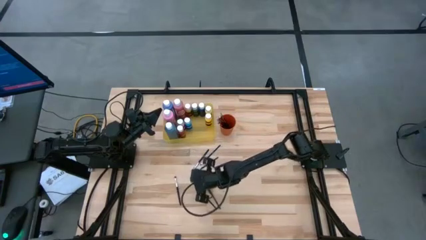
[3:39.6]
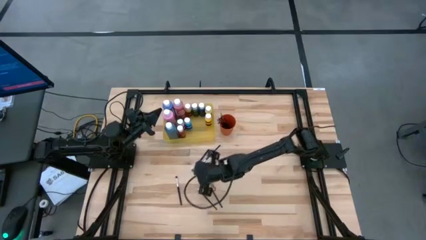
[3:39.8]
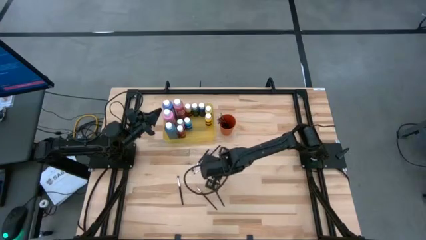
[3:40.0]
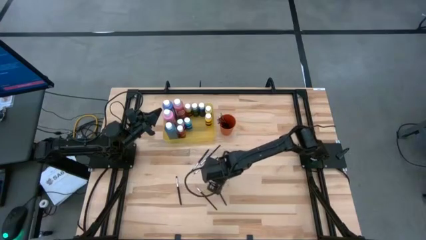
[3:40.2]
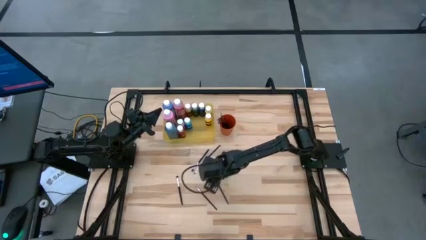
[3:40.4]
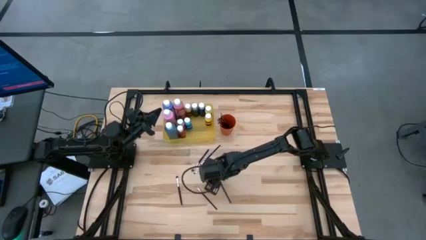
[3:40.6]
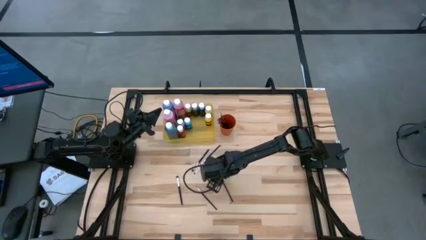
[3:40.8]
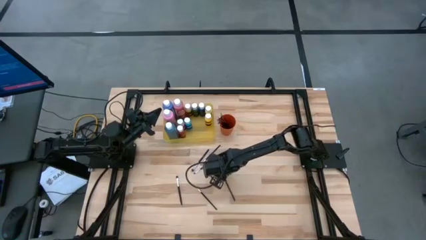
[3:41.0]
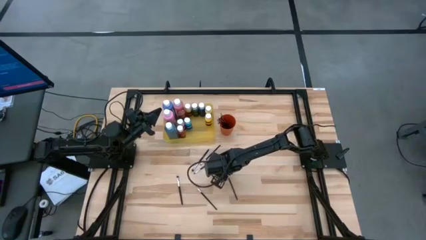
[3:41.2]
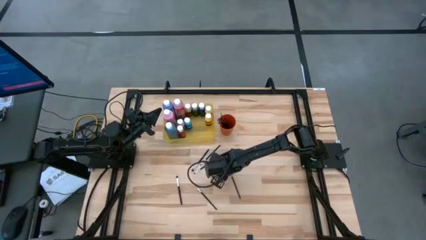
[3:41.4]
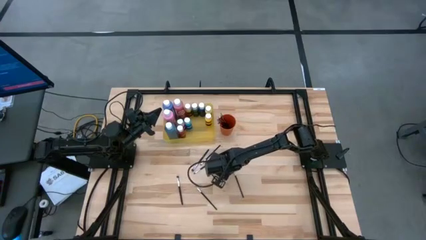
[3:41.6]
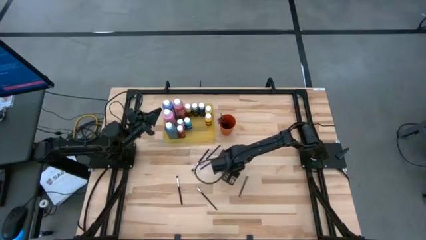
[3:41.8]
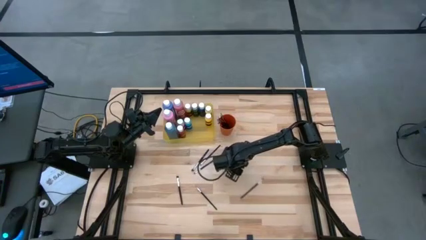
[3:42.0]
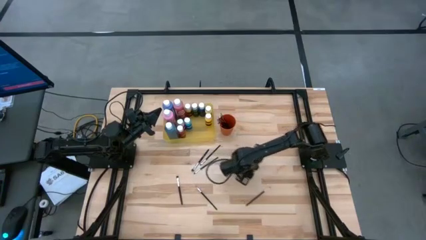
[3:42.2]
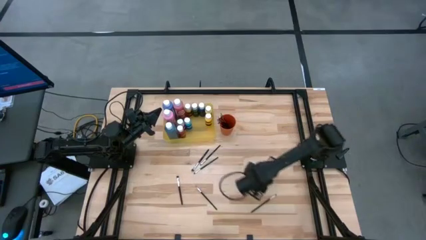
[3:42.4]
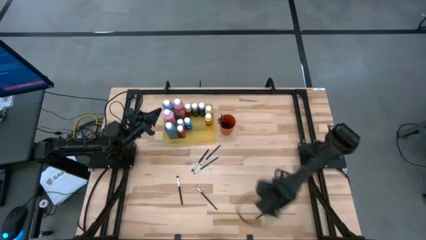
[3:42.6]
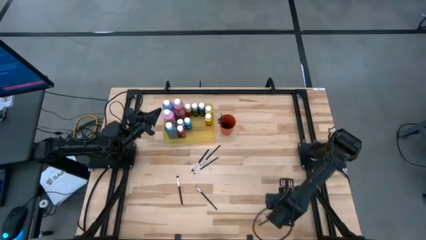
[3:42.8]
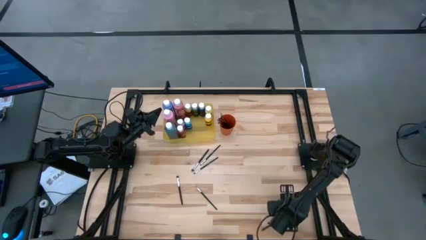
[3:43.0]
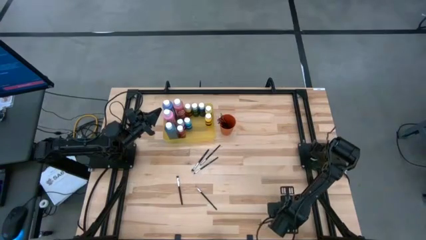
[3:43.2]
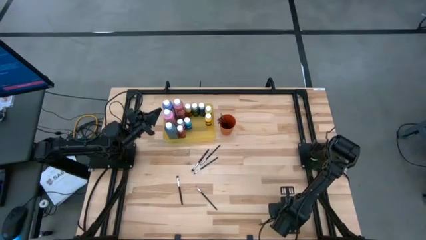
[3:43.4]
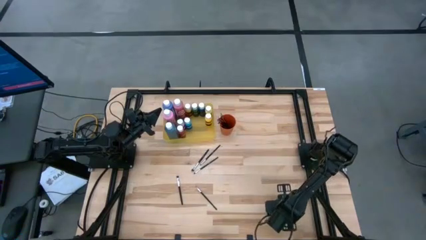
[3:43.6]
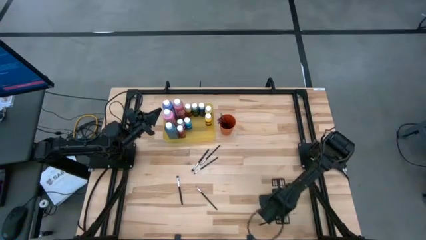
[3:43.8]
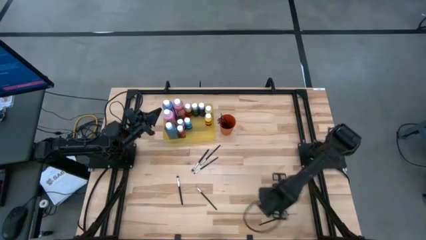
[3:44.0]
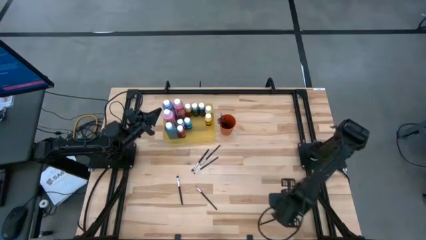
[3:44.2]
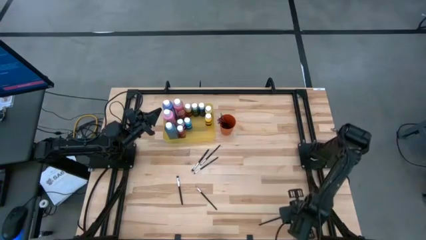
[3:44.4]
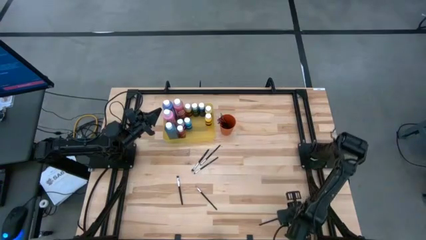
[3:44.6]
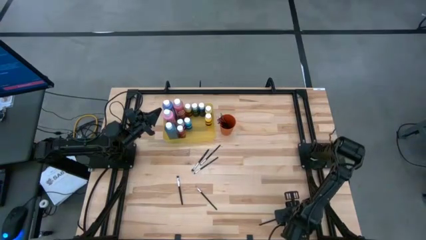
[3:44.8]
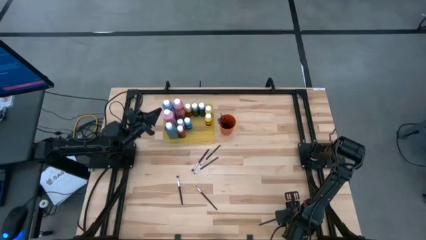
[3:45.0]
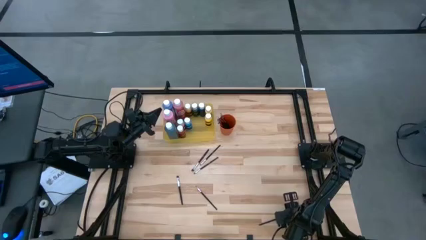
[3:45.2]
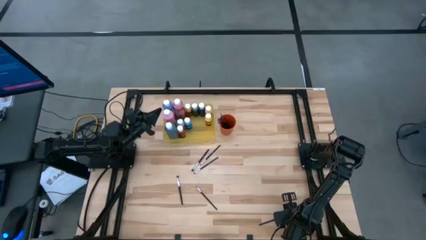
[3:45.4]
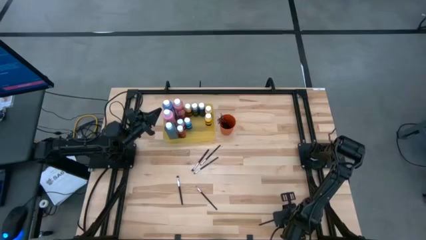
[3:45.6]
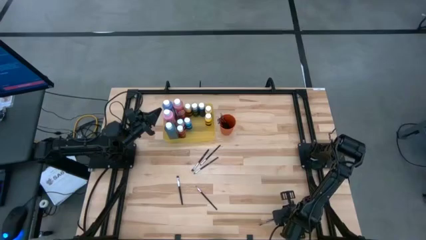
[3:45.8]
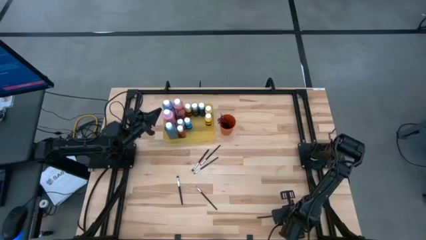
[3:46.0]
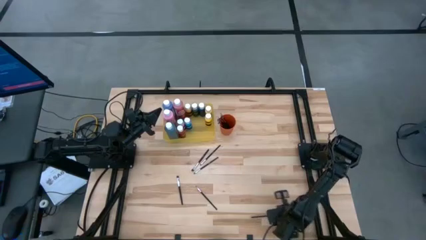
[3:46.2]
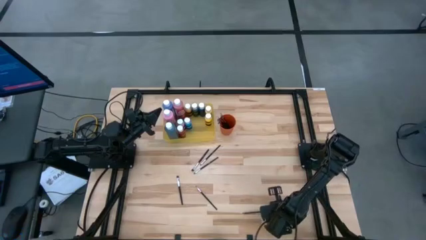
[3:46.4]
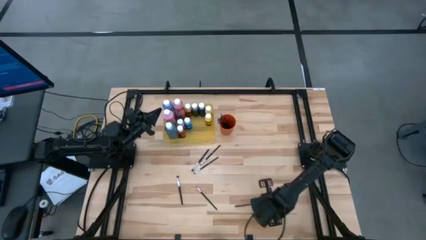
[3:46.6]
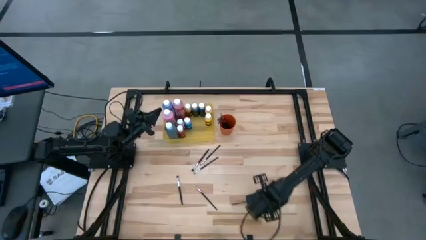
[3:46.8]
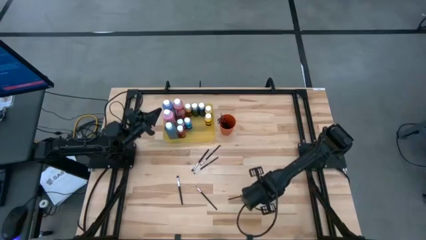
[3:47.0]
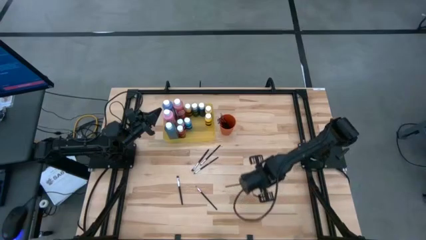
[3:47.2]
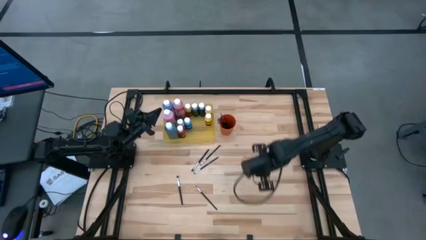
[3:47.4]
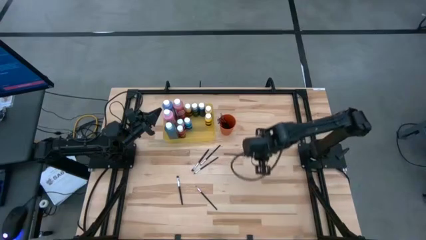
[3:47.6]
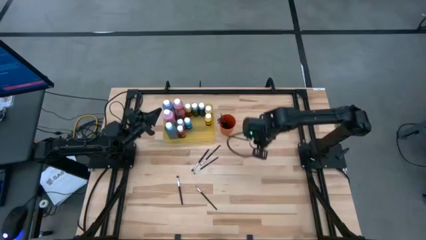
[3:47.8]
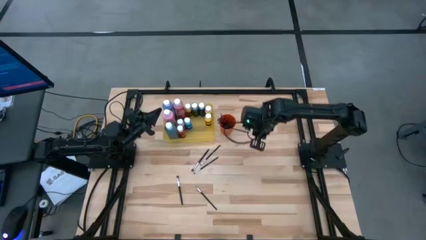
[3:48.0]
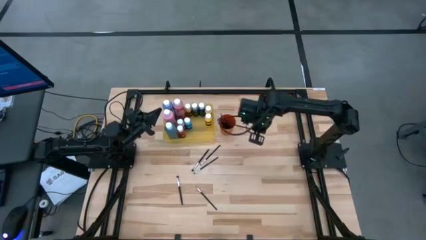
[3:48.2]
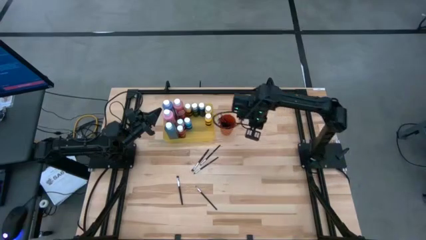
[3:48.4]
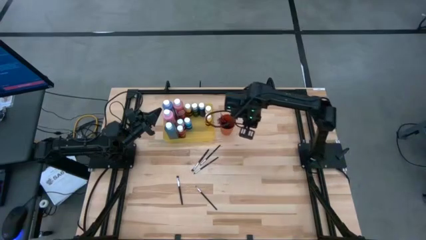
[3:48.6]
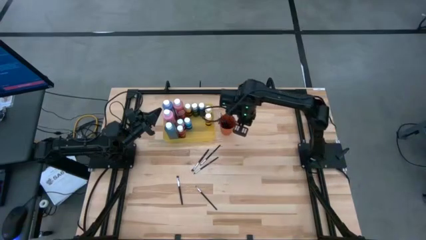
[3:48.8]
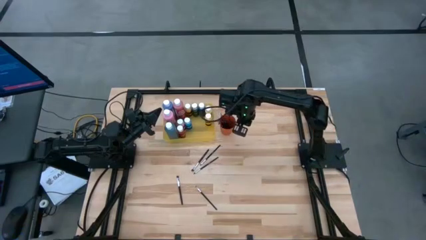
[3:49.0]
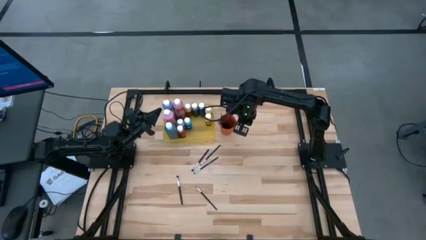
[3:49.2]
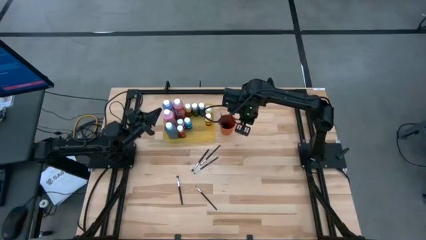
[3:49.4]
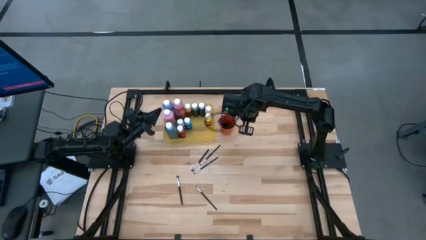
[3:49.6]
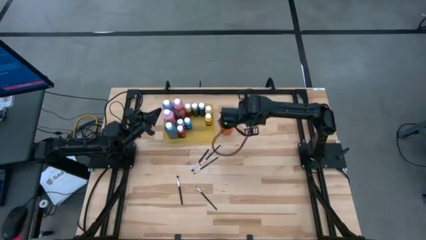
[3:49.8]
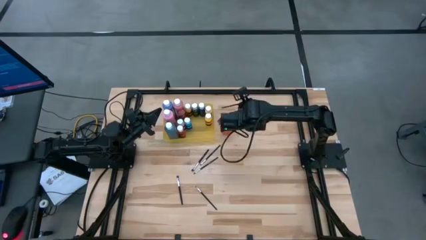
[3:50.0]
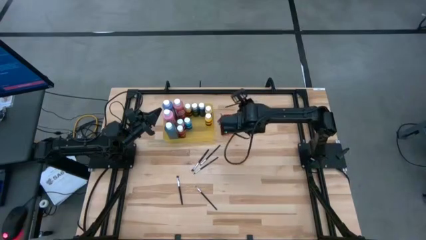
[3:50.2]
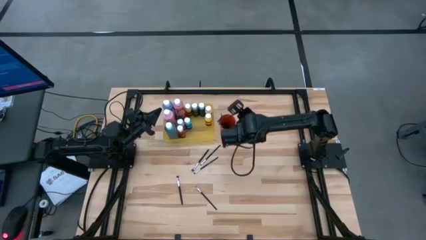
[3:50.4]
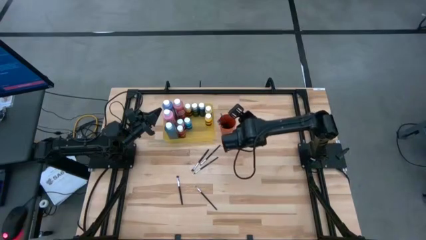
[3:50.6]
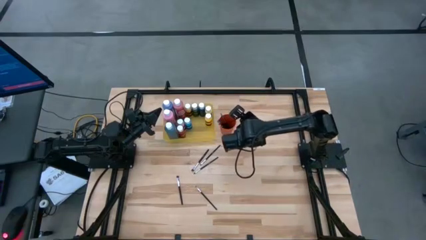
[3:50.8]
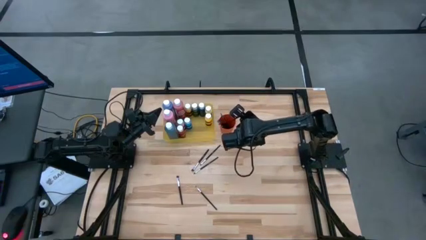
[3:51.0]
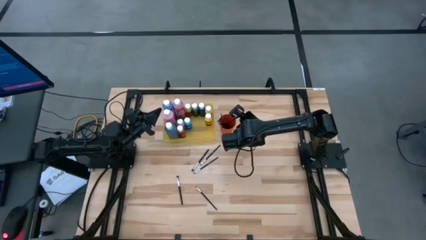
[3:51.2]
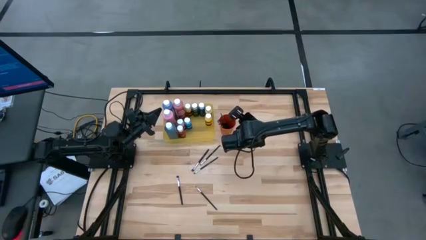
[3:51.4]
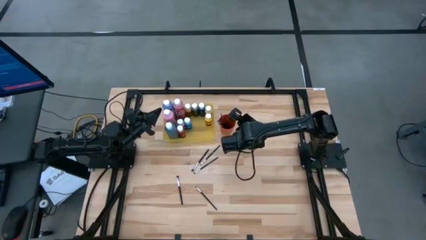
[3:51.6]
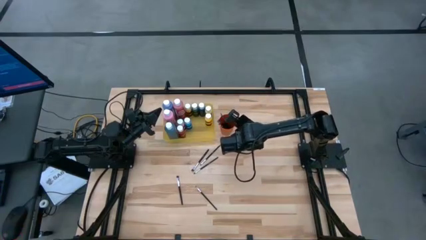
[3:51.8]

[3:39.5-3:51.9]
Task: Pick & Place Paint Supplies
Put the silver paint brush into the orange cup

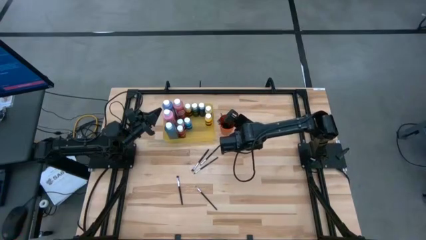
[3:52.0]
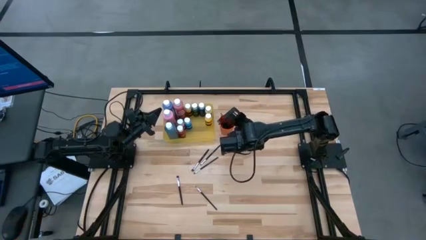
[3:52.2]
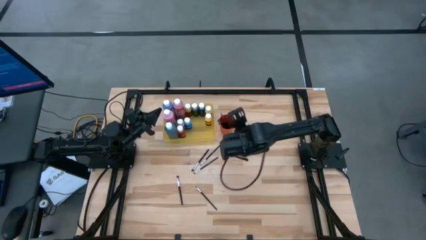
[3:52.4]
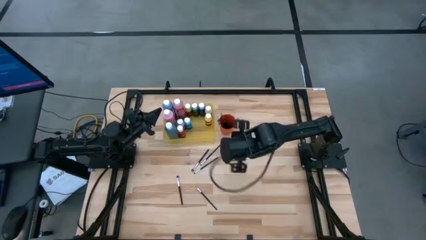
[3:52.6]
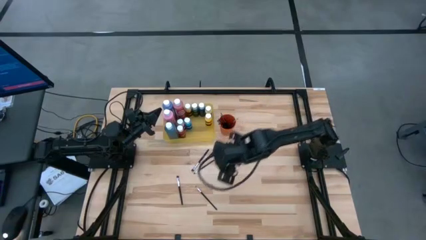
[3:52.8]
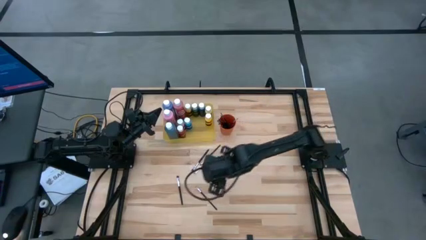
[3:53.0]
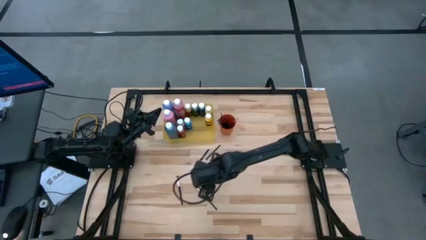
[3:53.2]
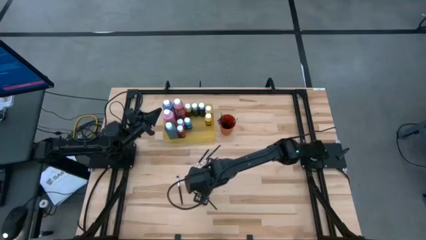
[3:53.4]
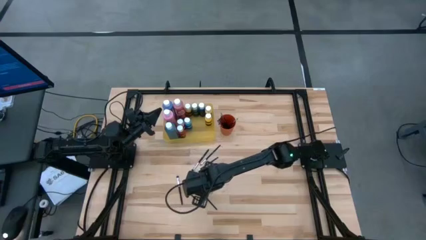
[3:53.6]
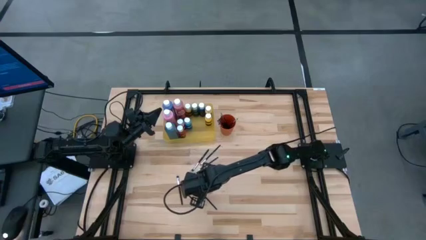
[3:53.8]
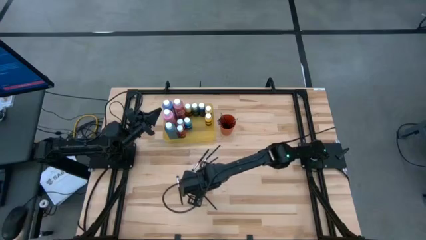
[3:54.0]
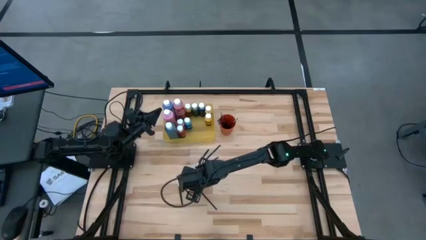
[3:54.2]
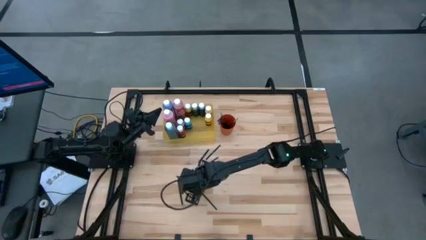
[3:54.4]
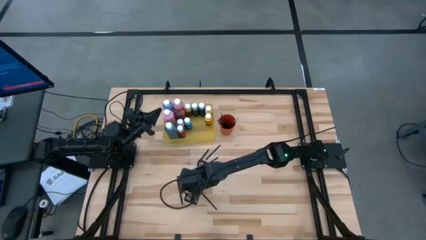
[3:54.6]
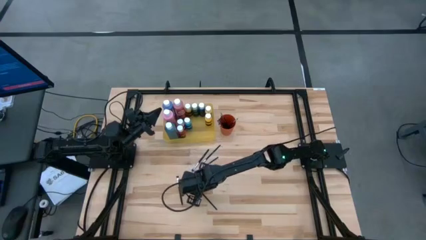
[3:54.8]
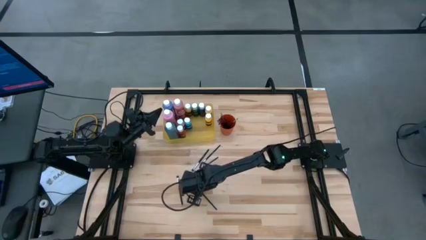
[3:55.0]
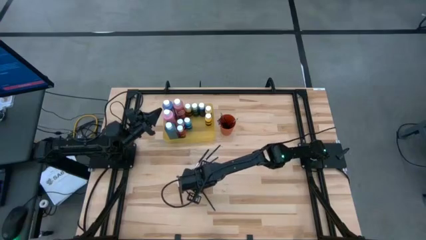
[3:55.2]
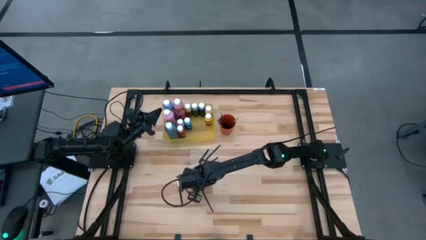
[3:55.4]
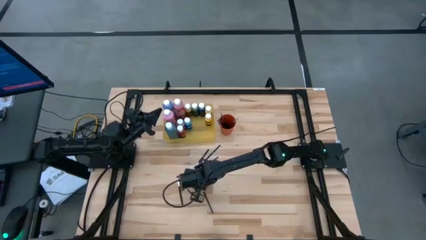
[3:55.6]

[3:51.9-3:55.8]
Put the silver paint brush into the orange cup
